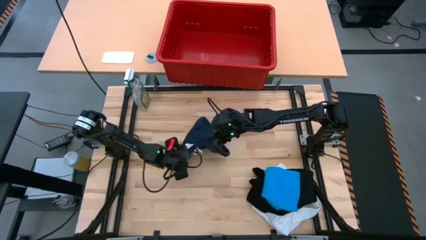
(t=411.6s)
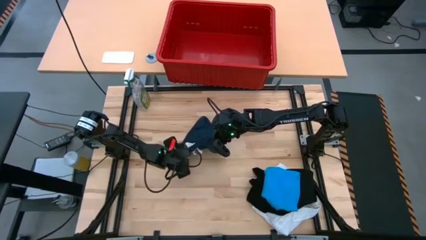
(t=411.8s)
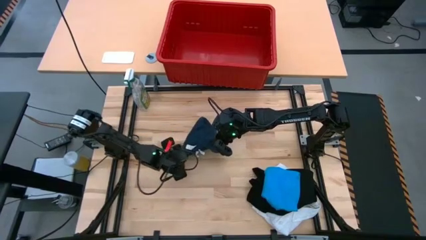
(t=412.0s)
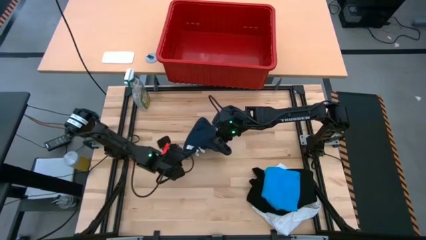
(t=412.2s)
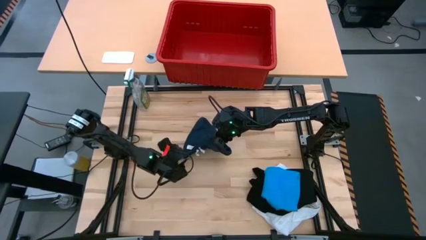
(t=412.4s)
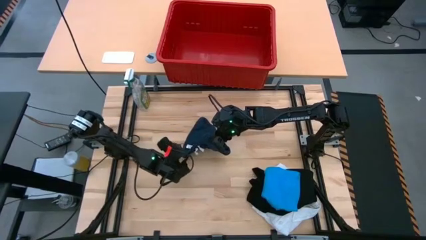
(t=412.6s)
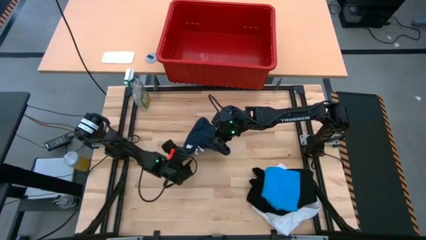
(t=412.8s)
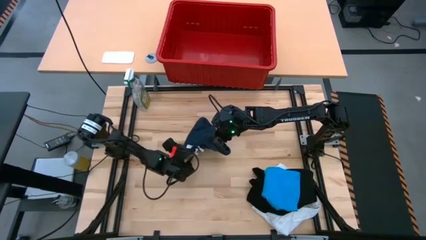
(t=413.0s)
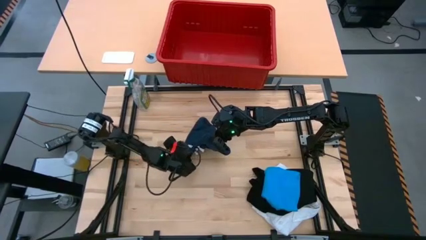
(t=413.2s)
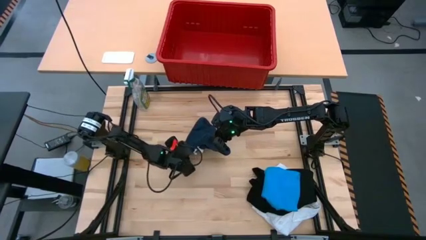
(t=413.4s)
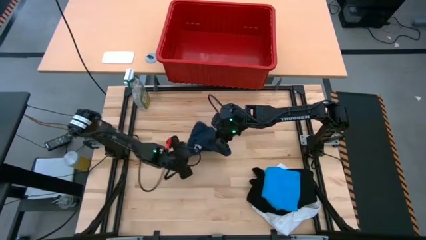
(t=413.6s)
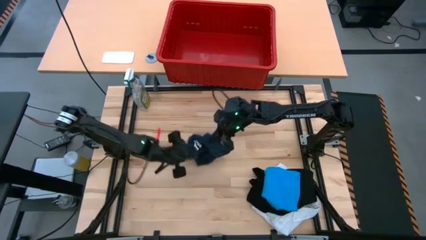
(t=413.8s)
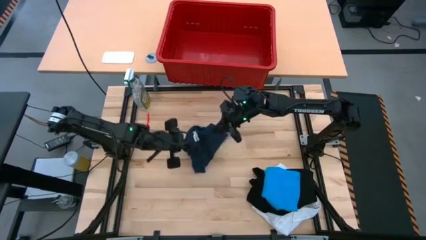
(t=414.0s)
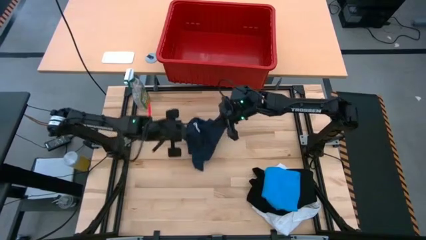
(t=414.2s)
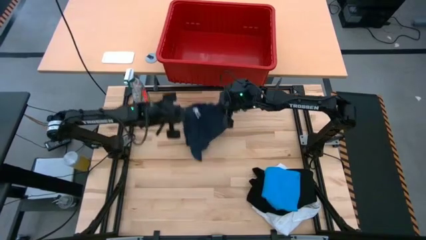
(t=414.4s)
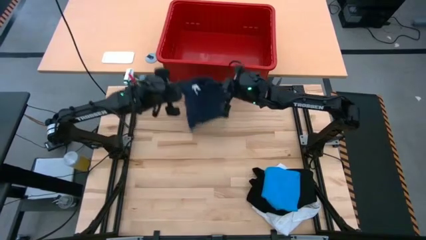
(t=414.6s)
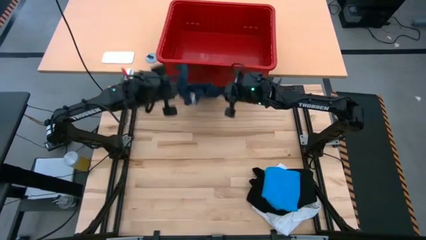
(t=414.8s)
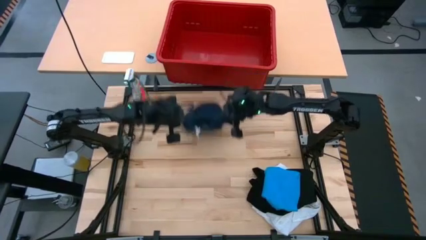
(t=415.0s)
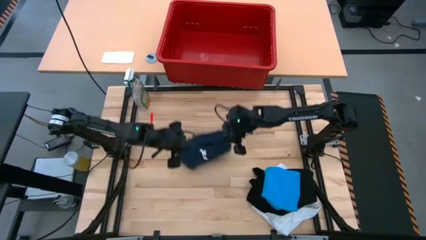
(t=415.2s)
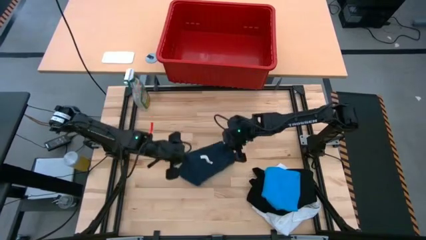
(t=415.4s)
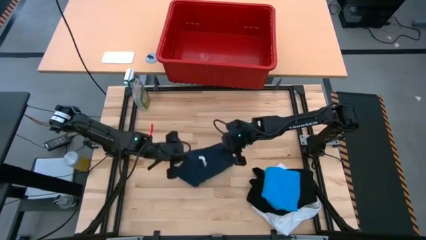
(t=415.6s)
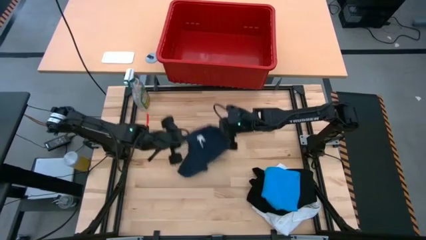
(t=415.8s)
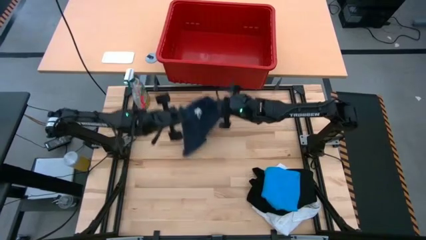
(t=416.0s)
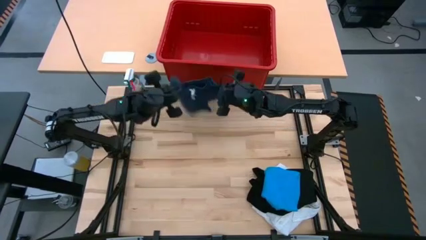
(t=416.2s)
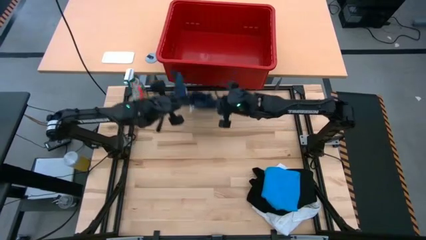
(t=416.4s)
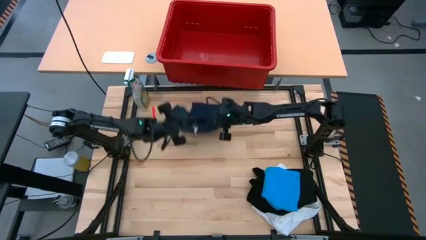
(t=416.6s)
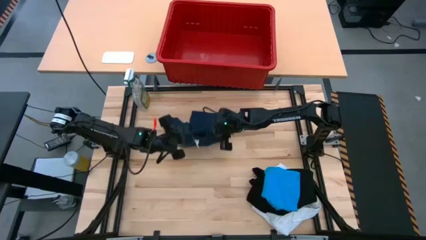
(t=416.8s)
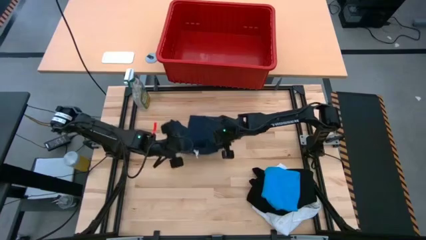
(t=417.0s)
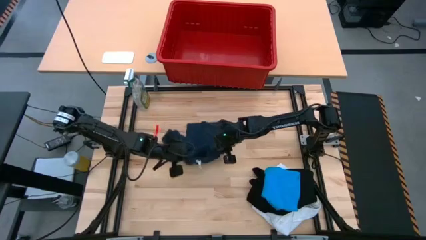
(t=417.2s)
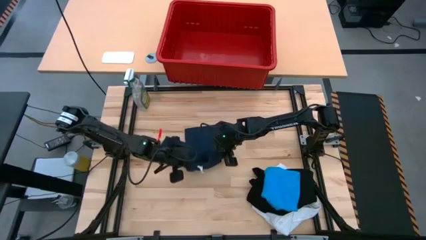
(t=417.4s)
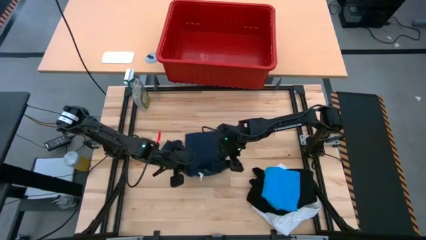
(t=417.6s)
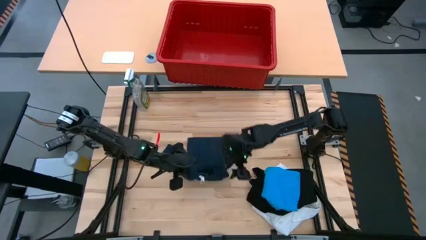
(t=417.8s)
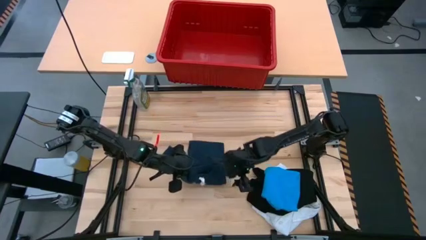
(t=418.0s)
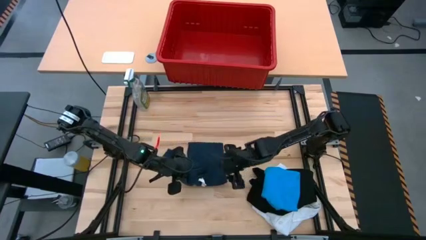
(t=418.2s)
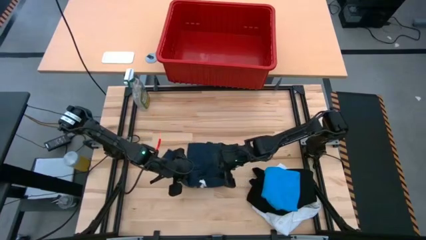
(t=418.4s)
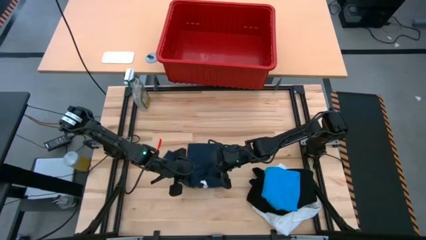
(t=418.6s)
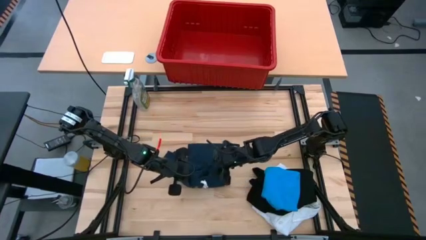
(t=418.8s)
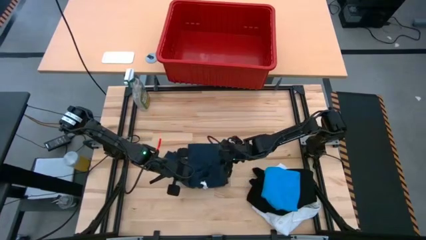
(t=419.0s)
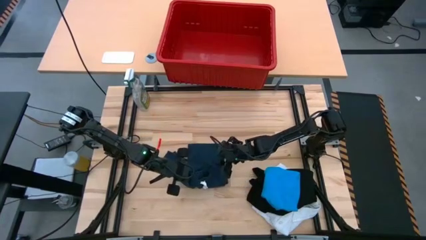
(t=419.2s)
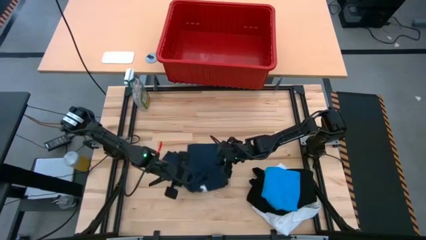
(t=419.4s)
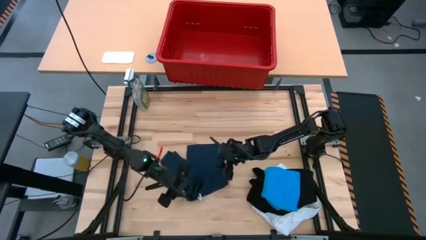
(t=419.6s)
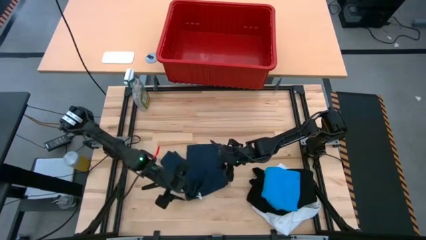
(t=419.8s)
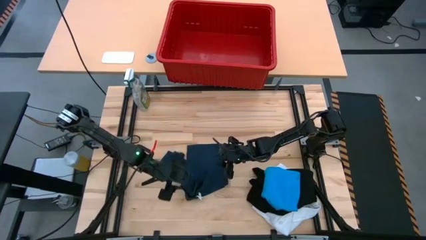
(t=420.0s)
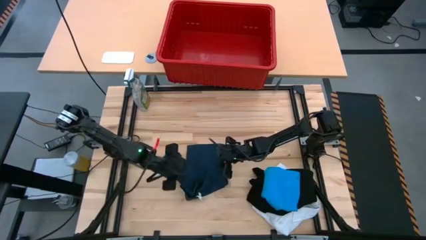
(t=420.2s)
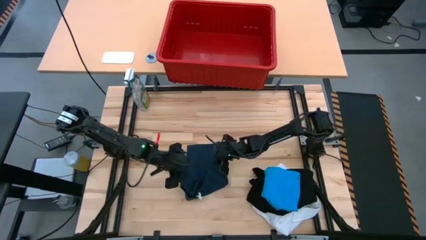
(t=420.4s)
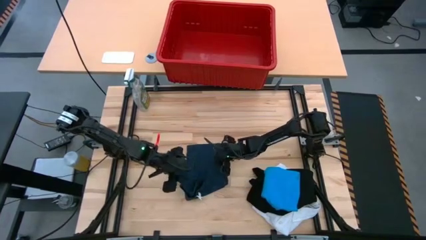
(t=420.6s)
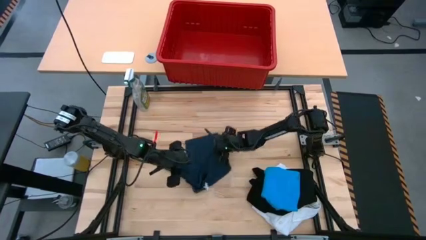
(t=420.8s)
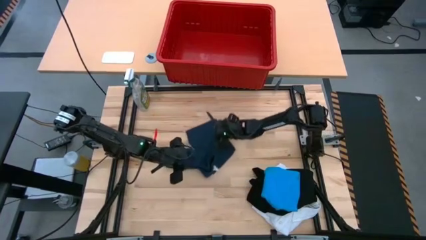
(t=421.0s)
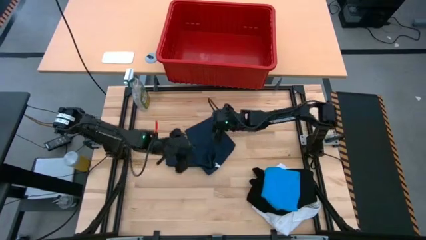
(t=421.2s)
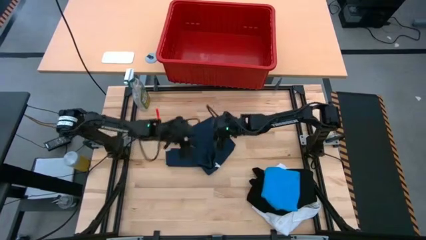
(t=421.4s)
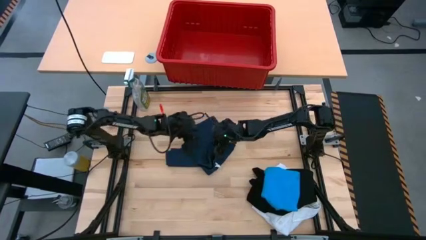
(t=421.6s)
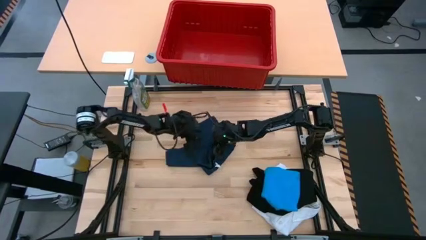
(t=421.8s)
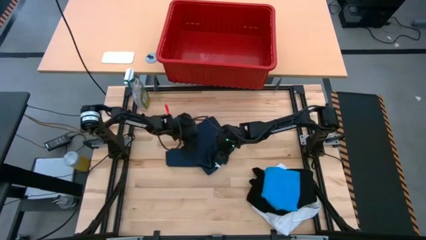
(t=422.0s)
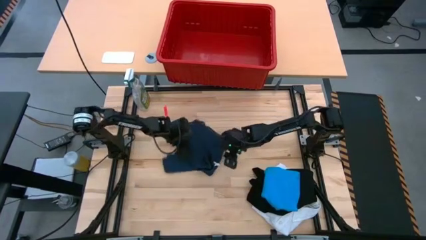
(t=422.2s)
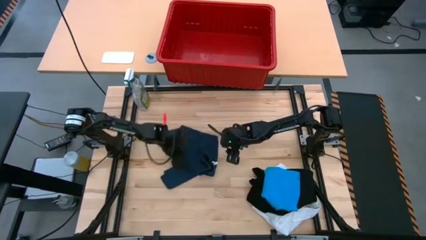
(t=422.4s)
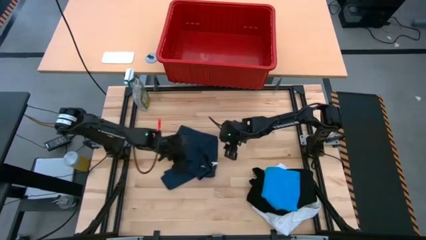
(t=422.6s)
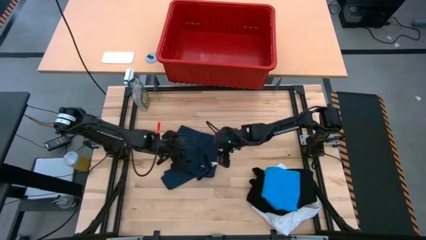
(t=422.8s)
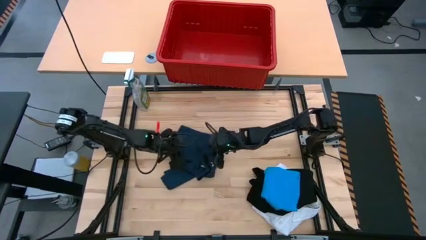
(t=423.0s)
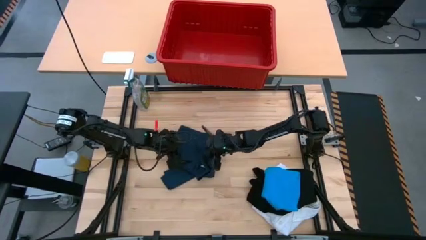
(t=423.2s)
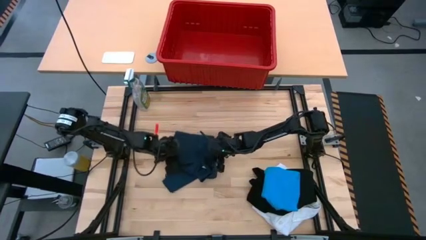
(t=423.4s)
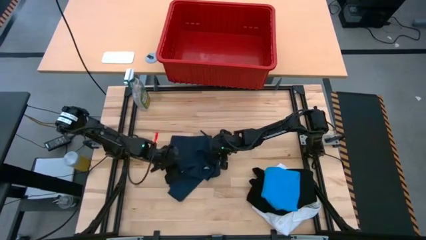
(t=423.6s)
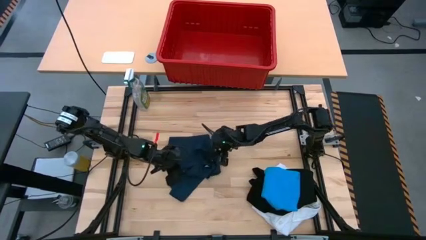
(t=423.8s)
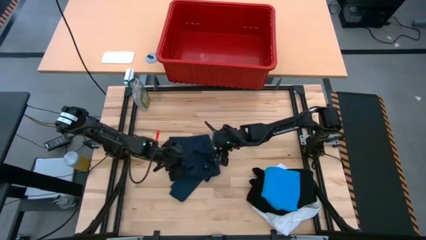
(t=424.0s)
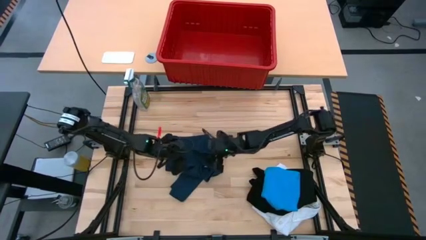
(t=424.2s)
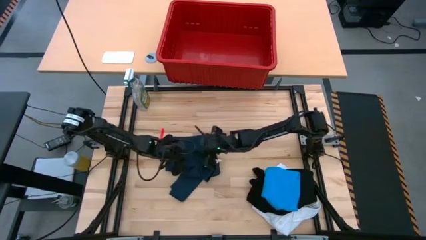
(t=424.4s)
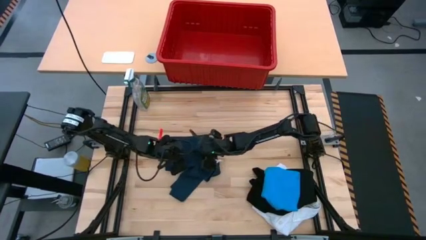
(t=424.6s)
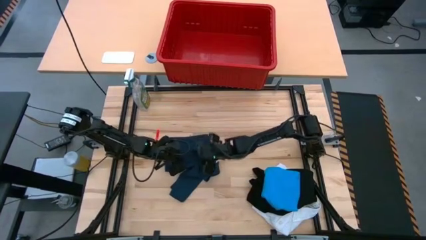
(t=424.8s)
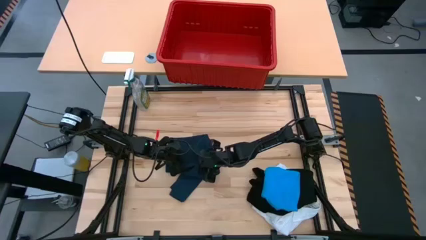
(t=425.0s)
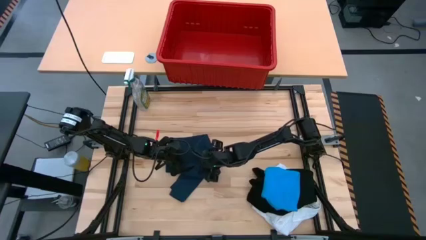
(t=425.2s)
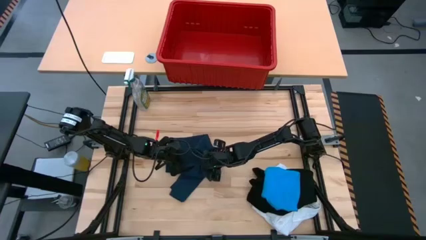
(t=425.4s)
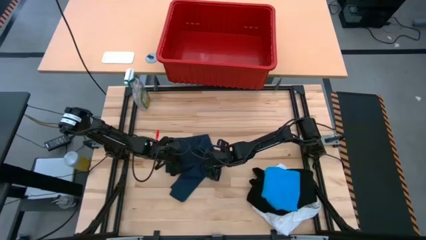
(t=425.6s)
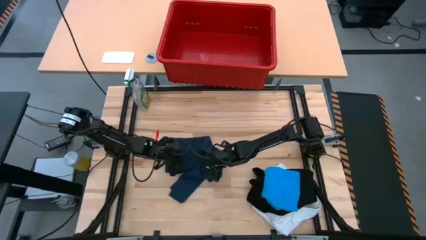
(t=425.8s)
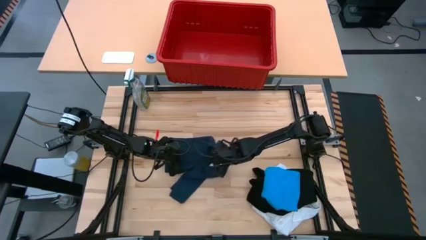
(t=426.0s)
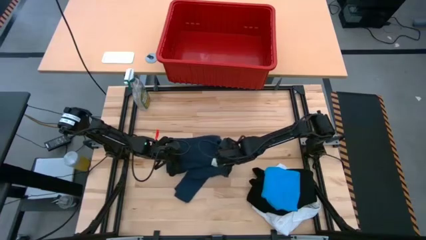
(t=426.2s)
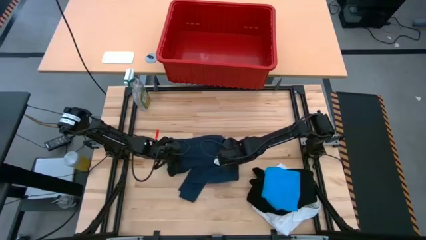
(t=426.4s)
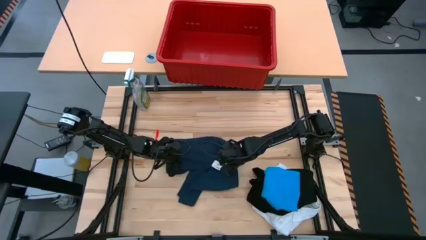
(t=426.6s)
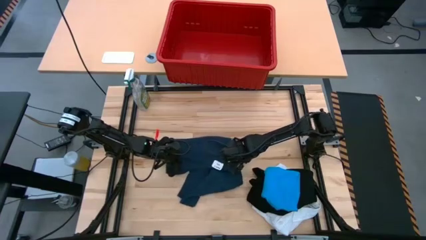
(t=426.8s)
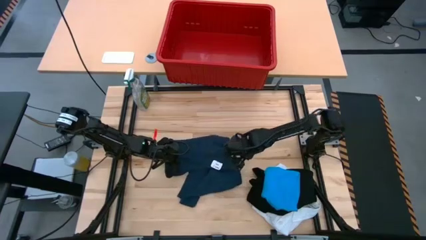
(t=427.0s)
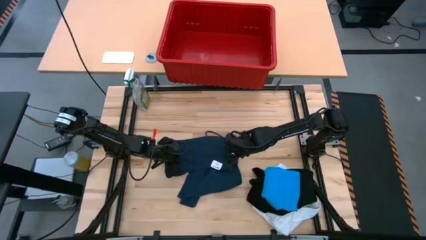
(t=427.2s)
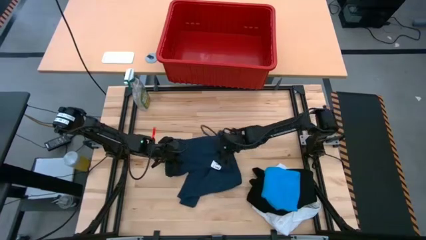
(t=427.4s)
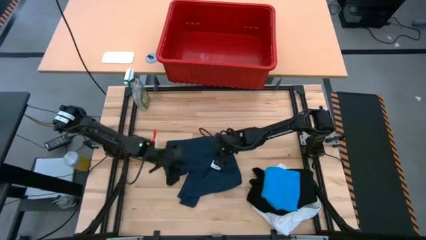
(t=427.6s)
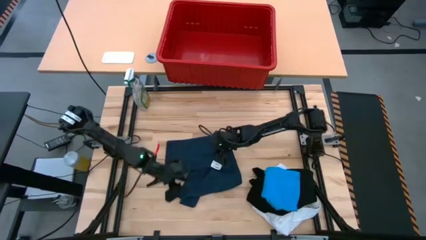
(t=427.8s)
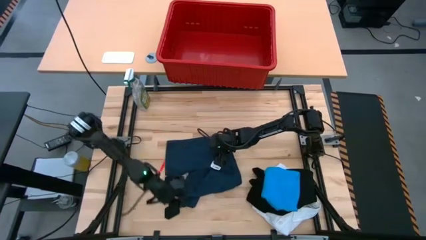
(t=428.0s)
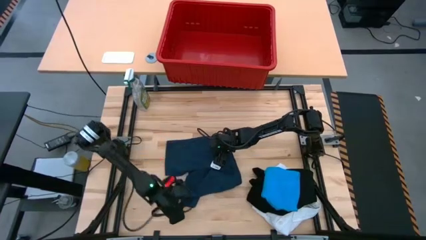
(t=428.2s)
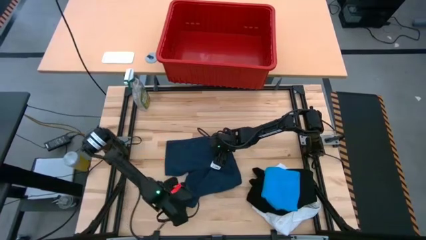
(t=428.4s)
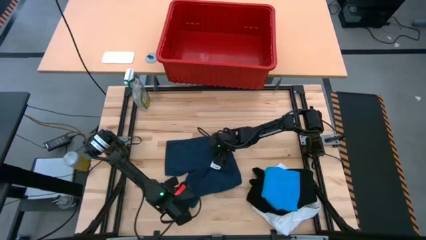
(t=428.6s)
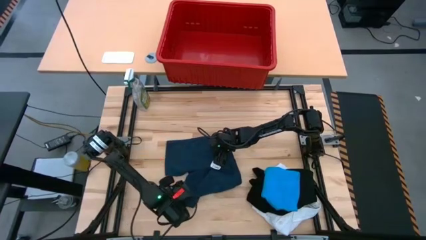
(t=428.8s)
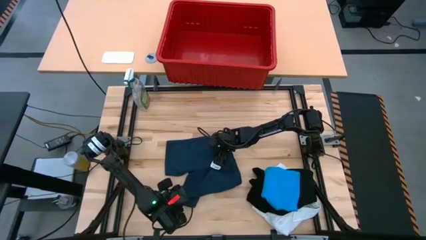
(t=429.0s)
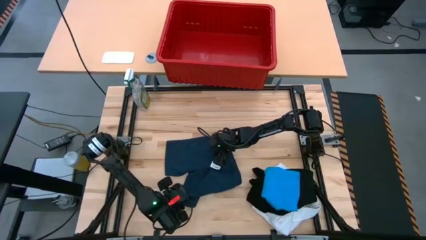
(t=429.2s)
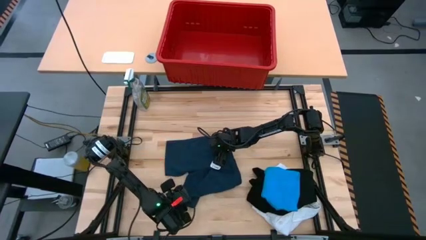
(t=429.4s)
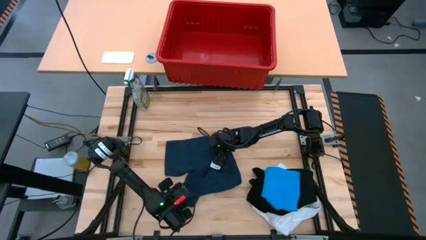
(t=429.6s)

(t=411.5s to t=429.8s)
Task: Fold laundry
Fold the dark blue shorts
